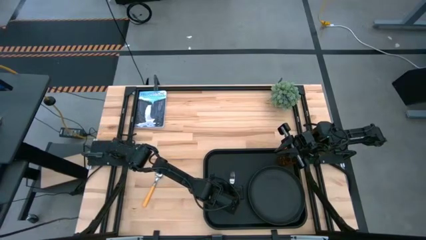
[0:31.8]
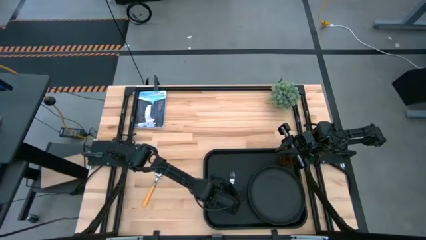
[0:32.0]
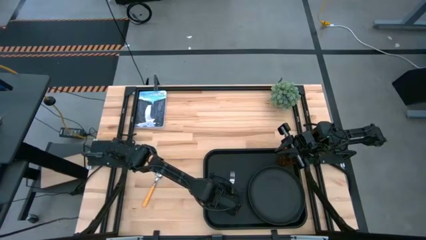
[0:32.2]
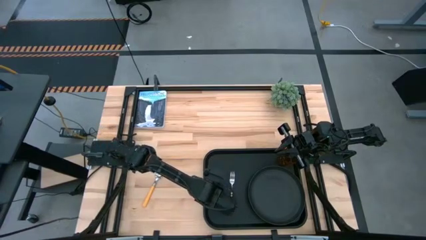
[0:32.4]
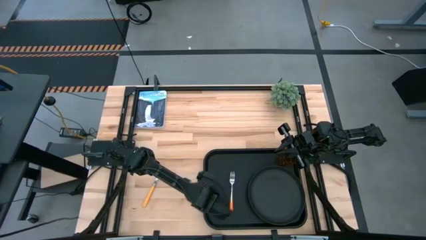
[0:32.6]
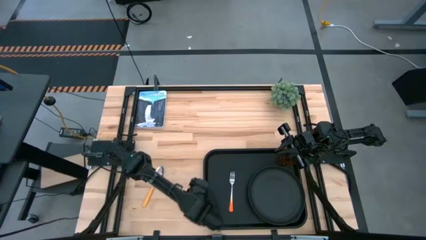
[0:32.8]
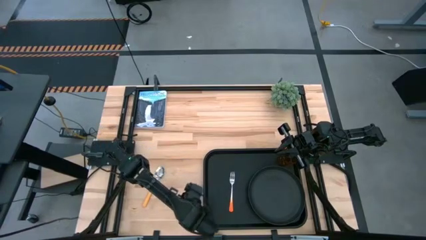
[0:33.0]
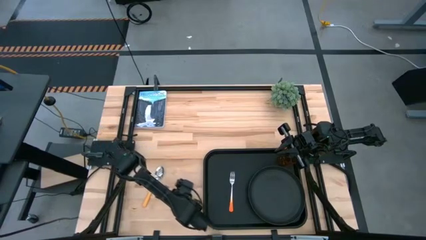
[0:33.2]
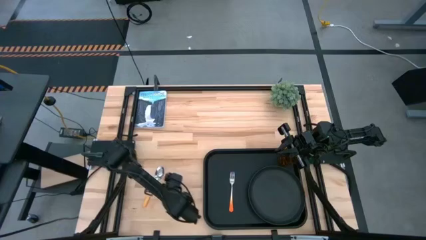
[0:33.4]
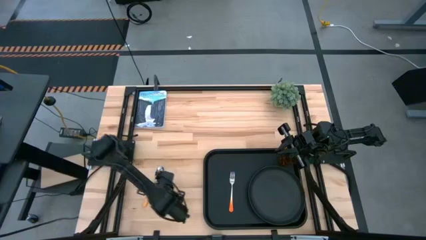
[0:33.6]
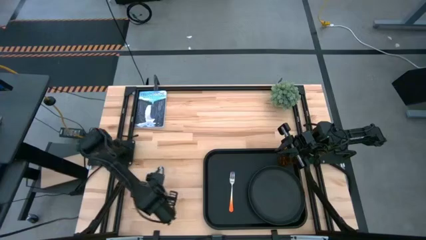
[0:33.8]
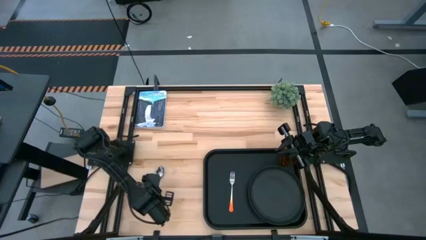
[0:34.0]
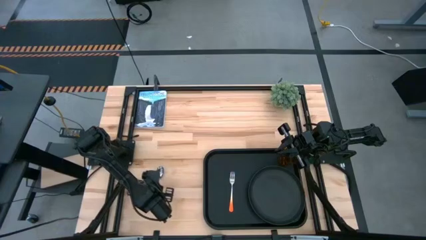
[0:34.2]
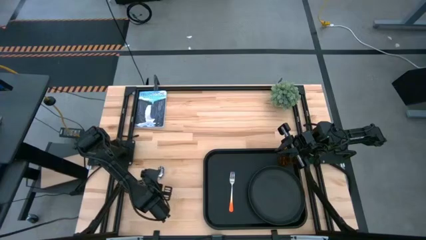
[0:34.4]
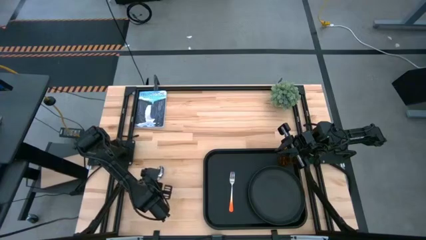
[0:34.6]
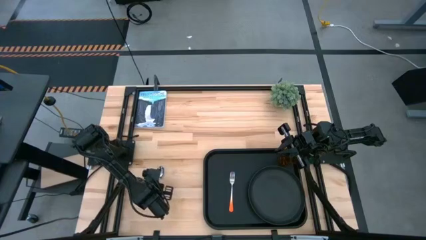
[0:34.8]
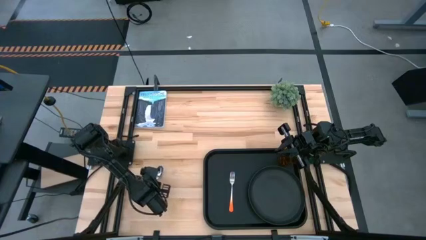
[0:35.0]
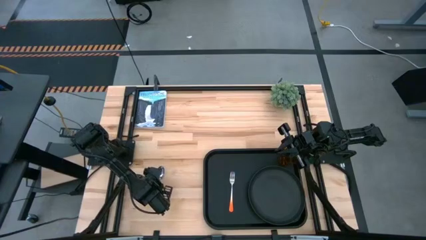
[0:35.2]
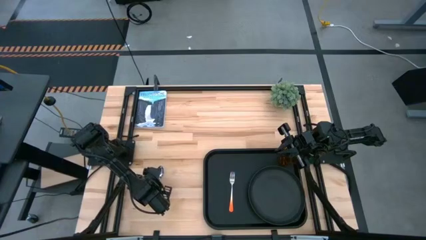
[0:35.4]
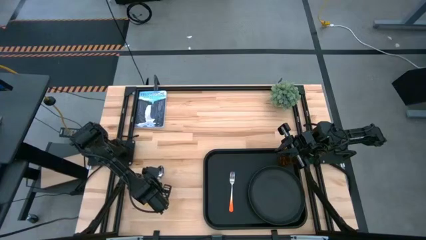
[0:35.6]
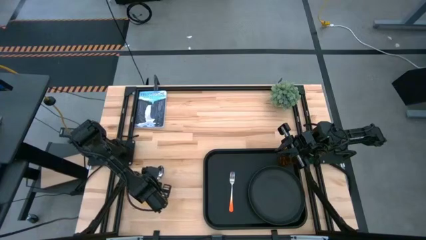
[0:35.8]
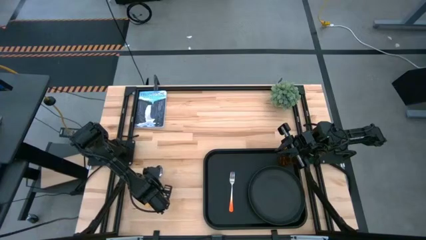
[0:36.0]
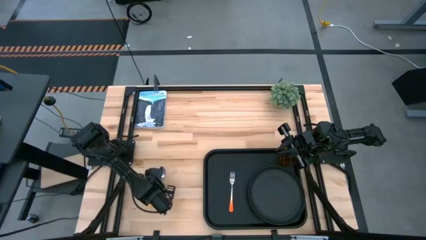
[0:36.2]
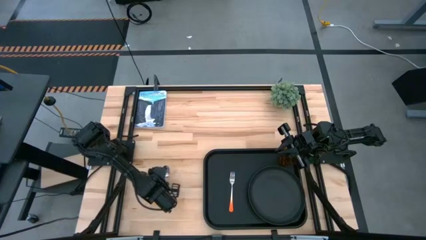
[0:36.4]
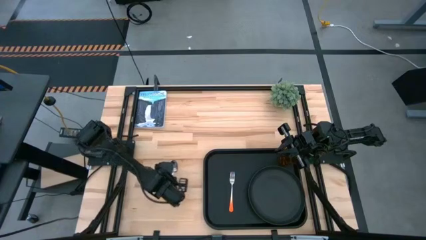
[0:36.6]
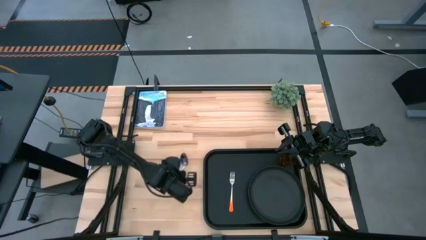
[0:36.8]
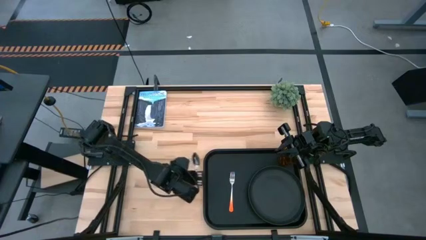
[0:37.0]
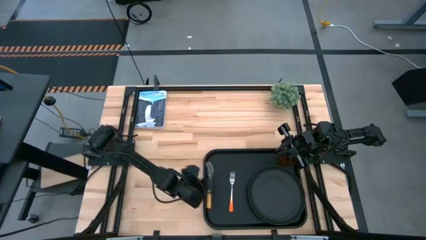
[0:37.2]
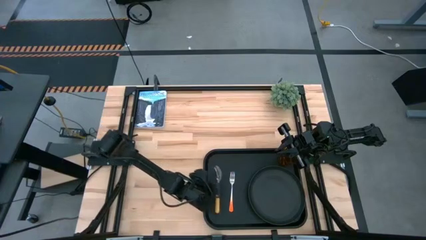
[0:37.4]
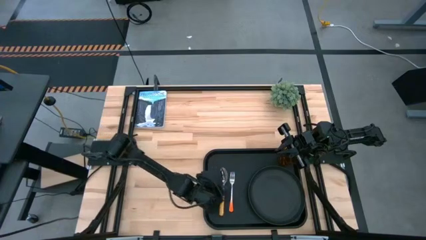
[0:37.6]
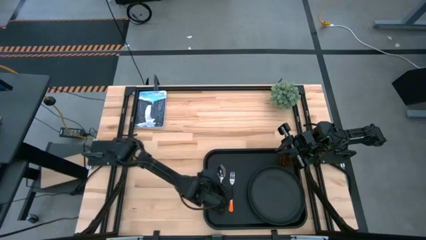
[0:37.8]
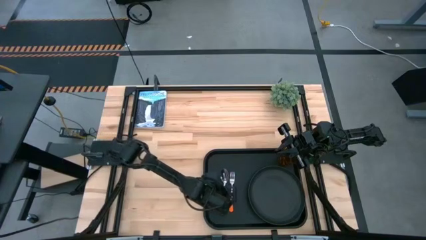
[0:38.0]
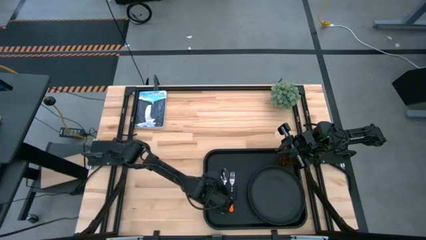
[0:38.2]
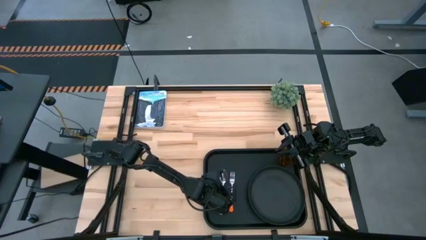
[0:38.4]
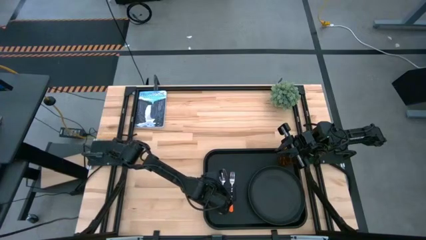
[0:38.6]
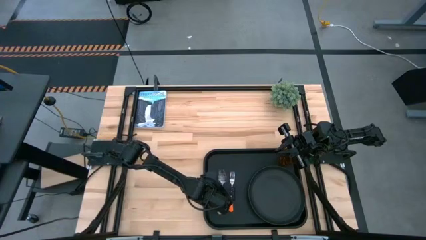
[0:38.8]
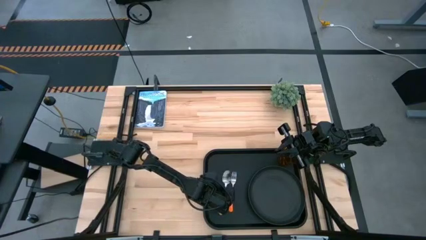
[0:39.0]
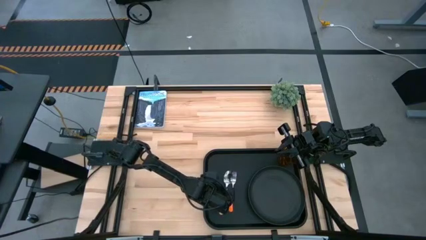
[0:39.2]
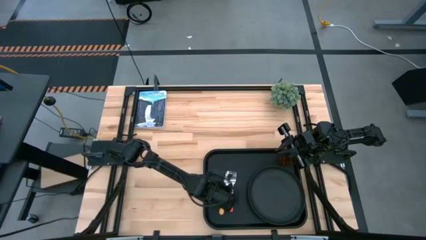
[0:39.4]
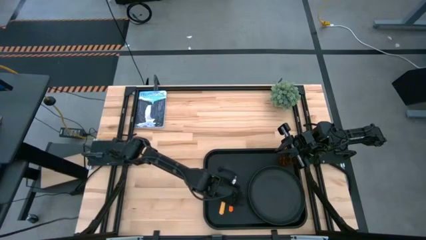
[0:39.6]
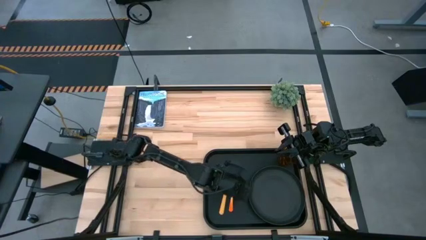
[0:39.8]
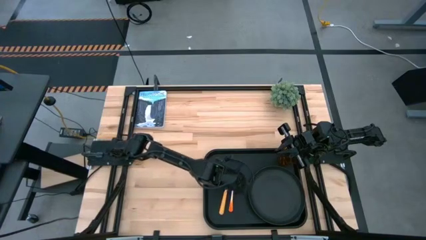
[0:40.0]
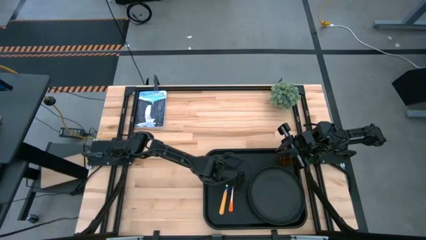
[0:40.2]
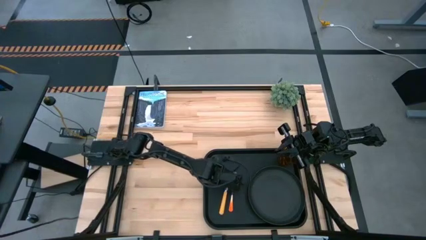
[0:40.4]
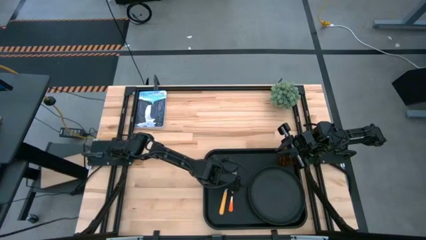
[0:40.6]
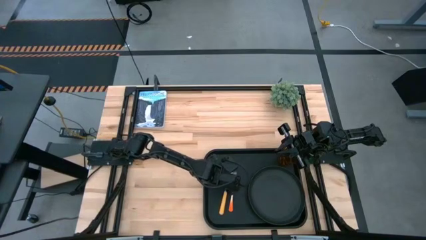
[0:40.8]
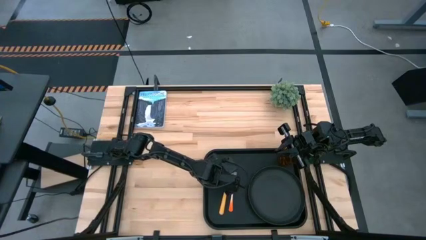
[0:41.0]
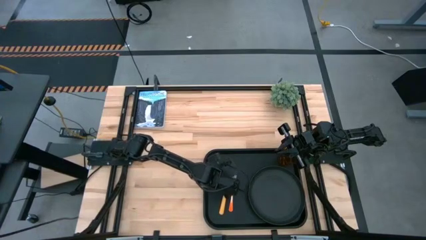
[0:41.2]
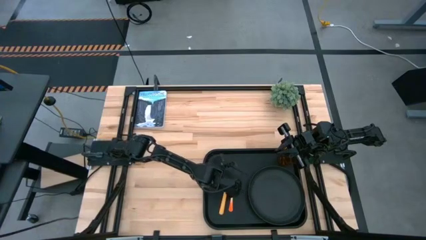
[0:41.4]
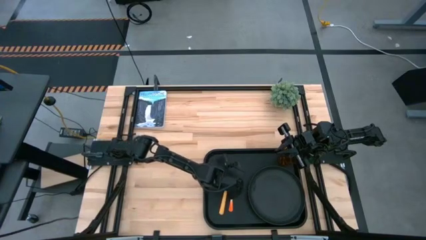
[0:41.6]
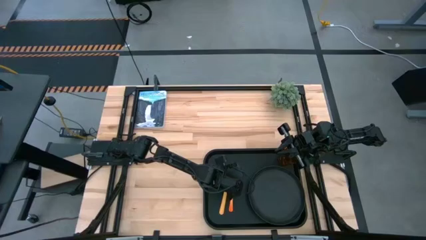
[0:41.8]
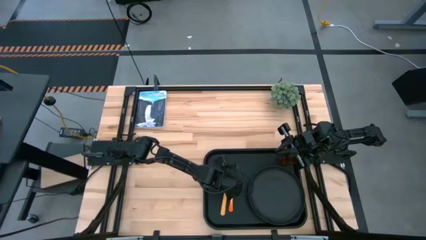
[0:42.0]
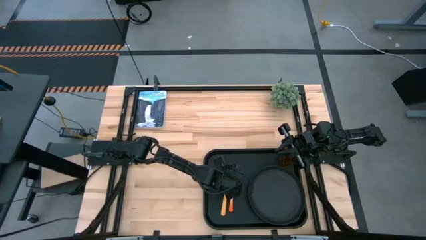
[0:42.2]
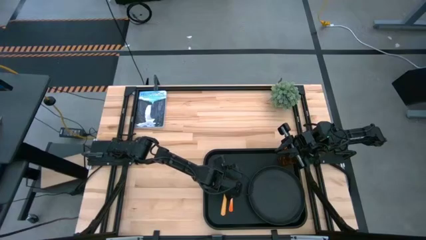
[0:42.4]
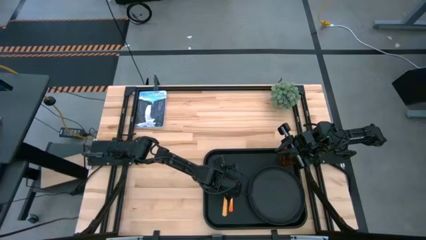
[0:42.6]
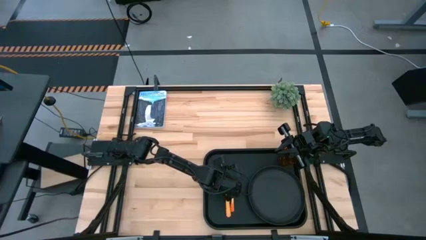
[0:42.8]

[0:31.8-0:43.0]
Task: Pick and place plate/cup/fork/spoon on tray
Put the yellow spoon on the black tray to the left of the orange fork

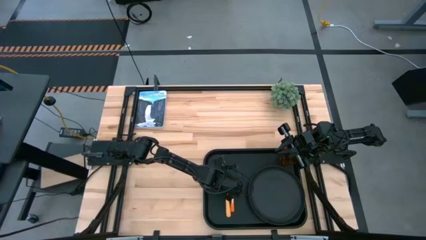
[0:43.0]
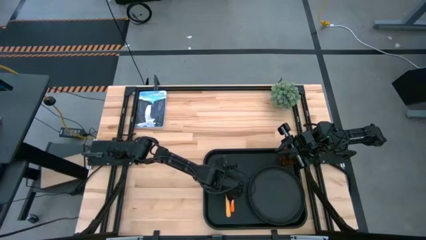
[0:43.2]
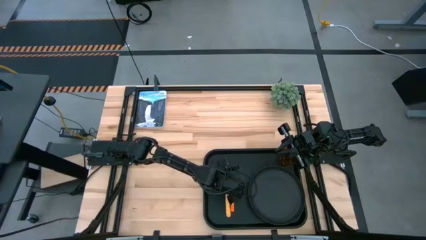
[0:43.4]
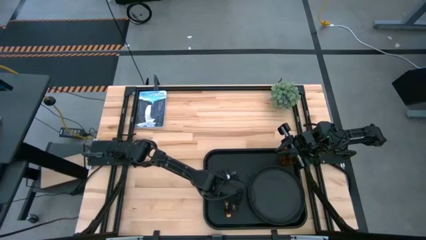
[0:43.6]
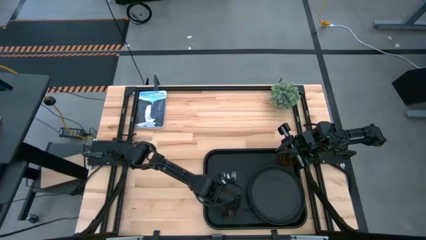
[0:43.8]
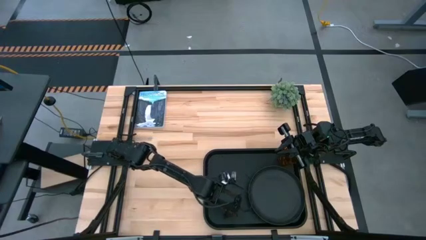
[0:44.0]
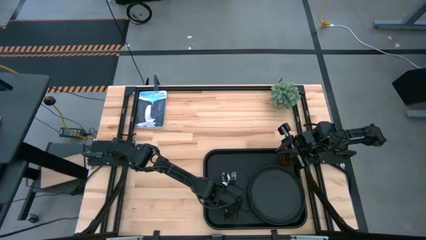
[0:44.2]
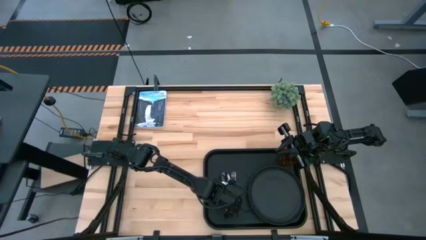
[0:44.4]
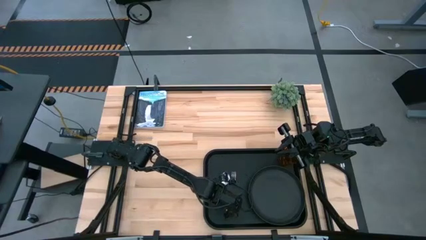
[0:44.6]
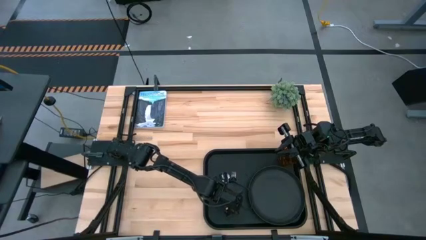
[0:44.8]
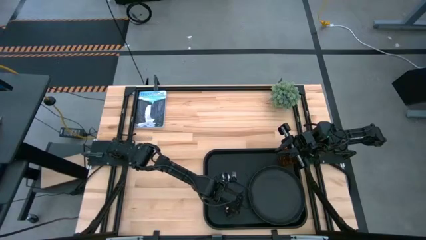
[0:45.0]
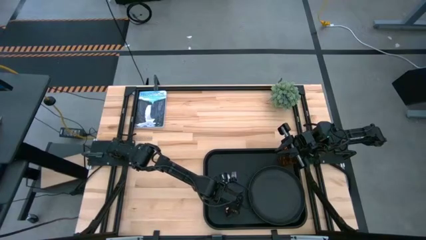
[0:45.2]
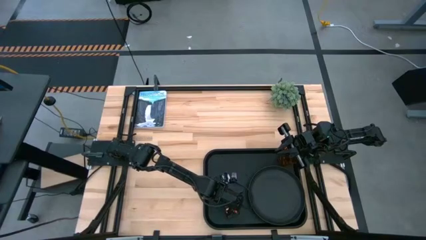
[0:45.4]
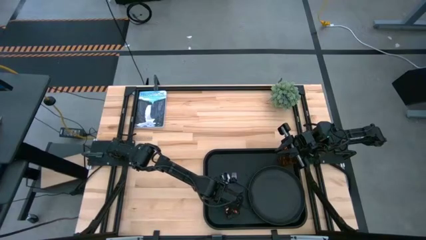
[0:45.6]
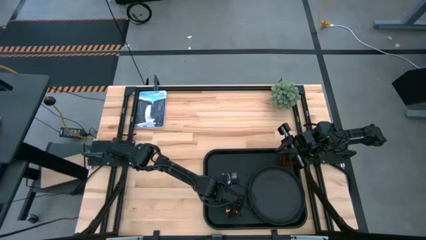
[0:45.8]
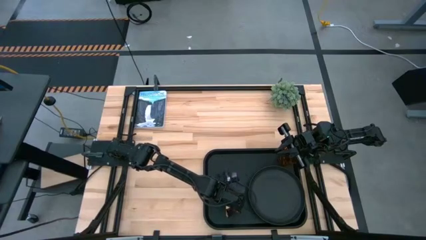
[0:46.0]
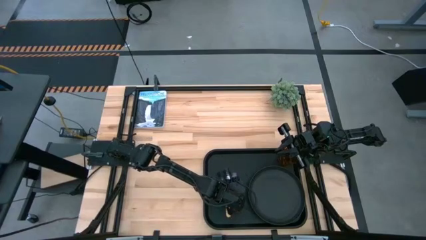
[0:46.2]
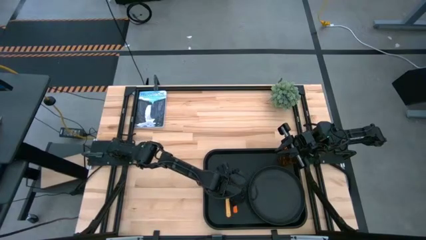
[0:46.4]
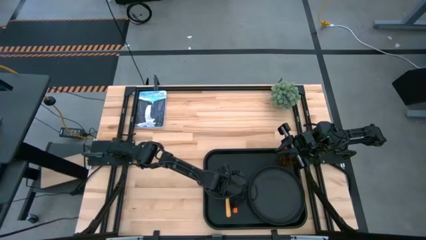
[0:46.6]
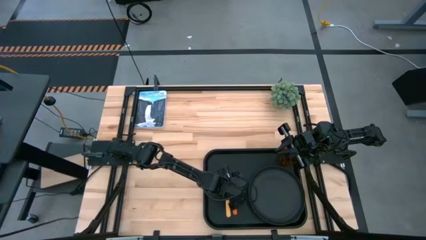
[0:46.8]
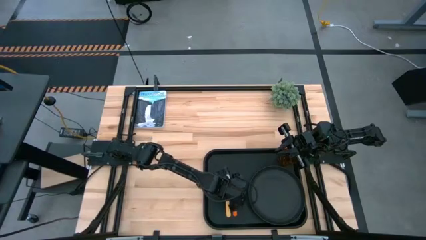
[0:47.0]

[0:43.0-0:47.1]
Adjust the orange fork
